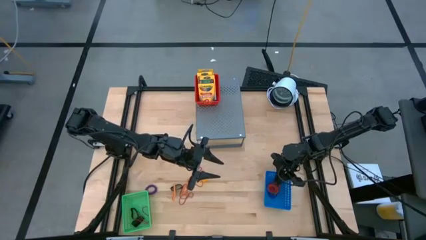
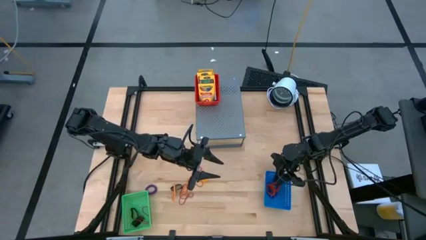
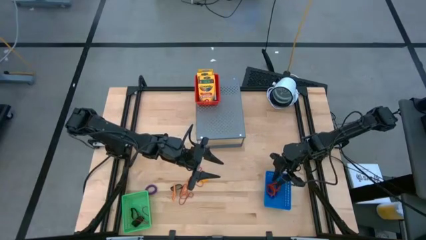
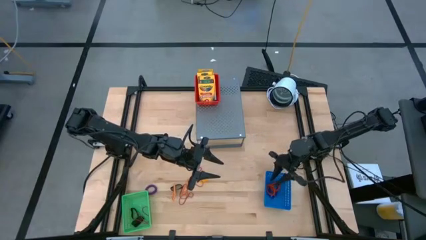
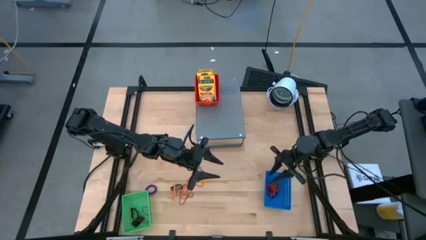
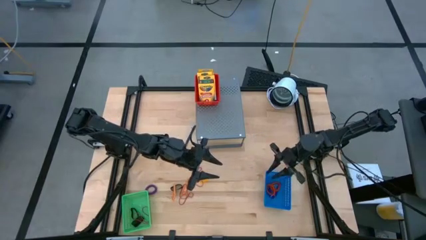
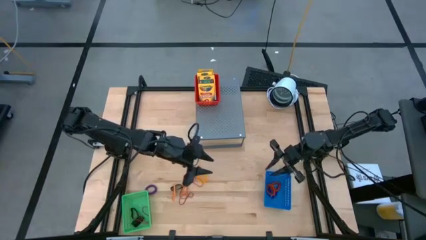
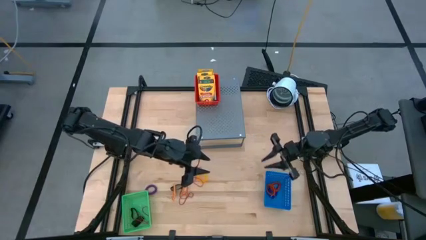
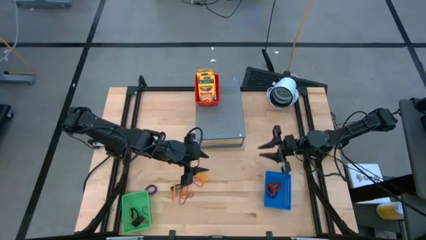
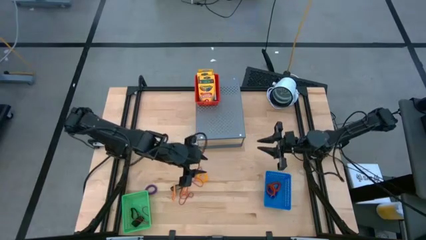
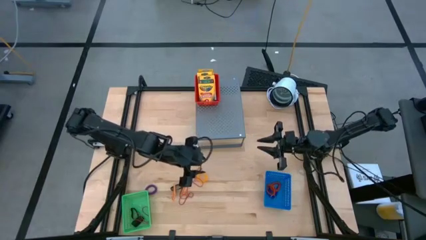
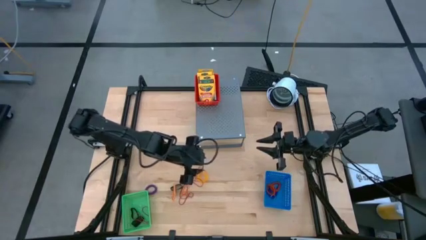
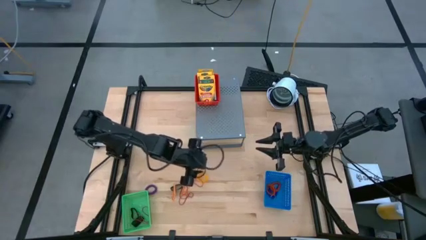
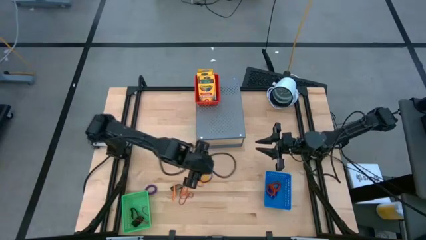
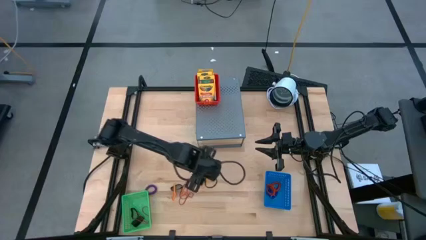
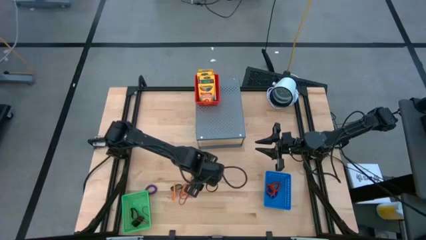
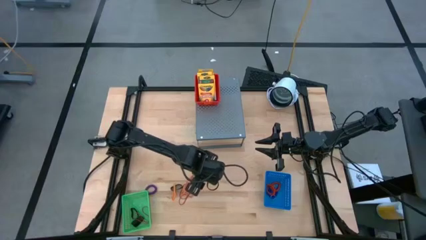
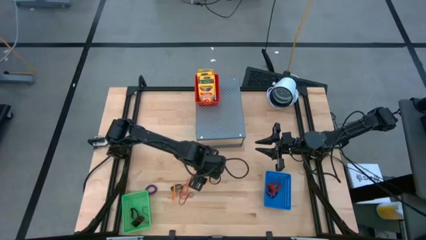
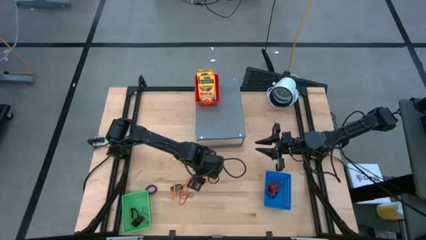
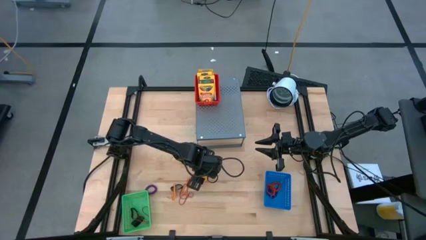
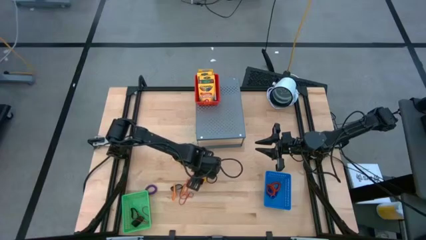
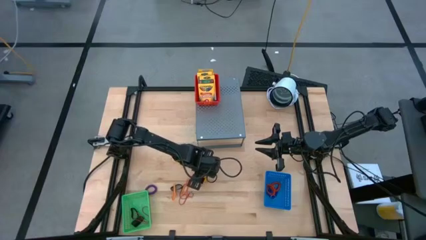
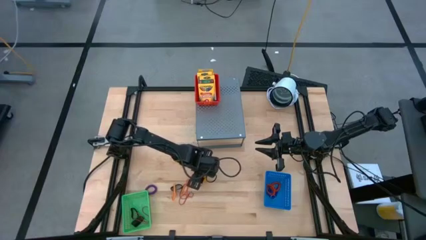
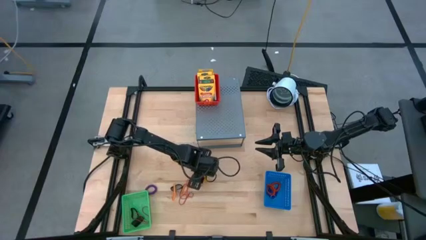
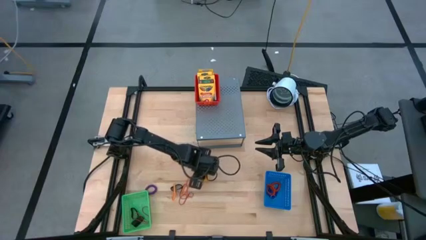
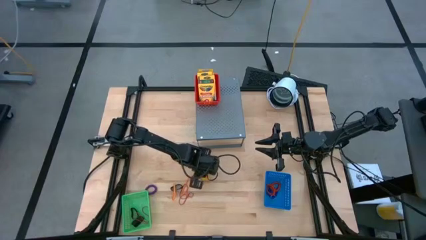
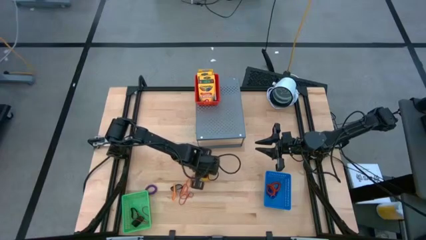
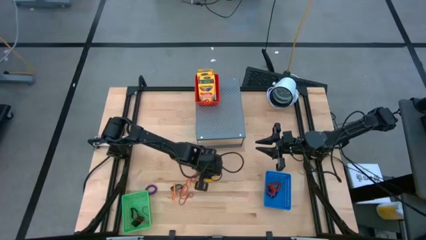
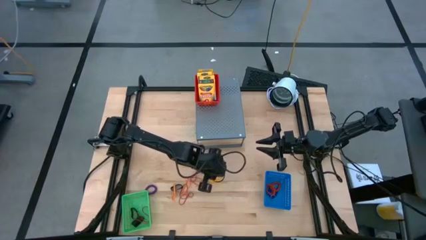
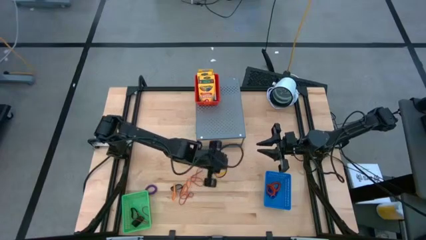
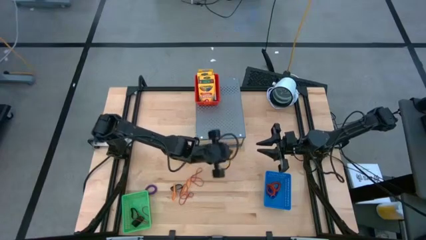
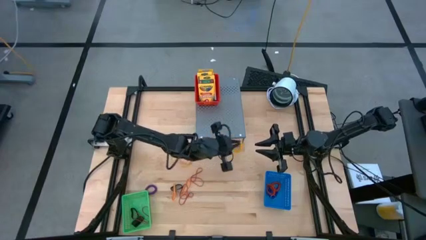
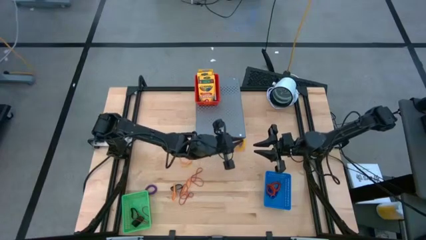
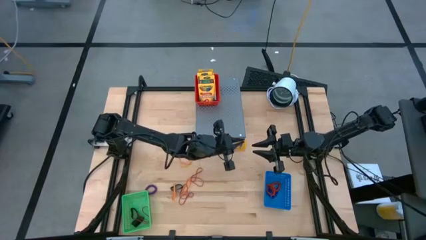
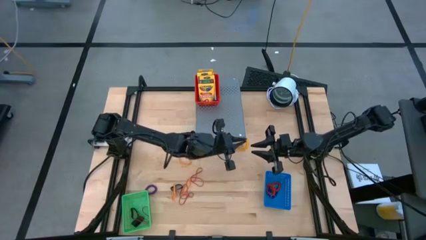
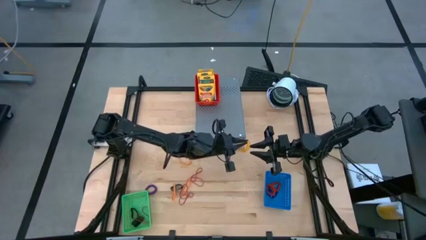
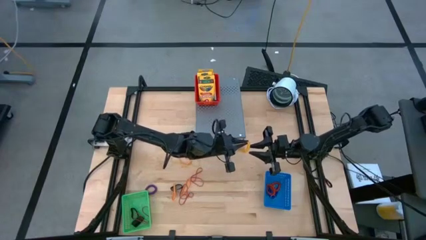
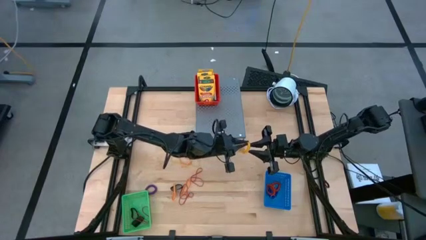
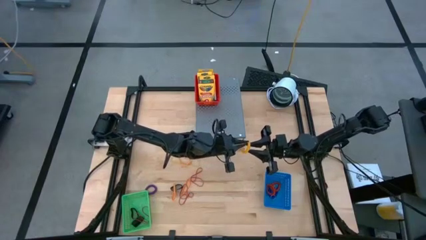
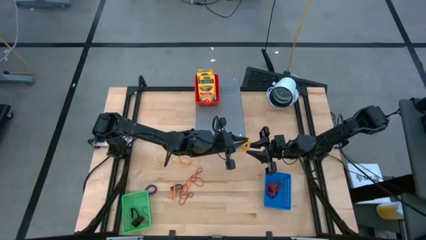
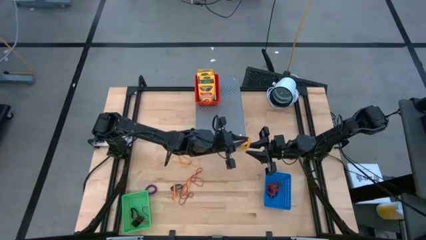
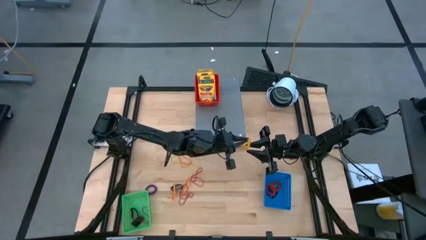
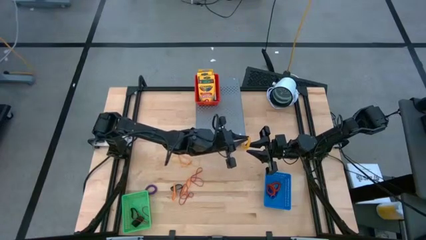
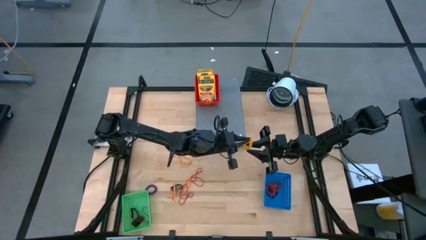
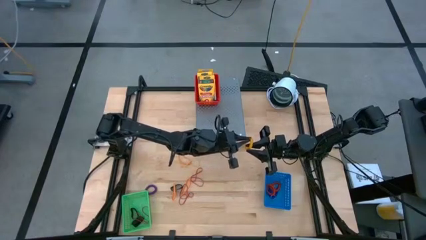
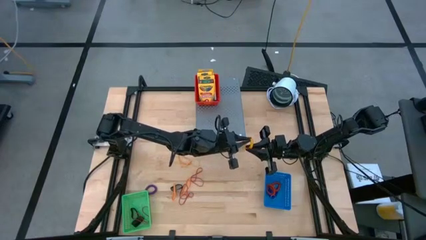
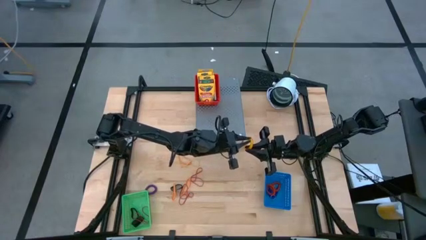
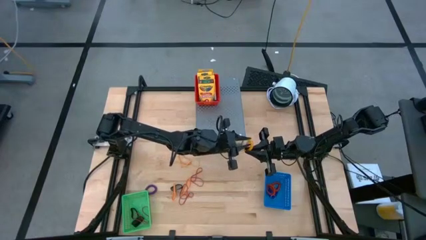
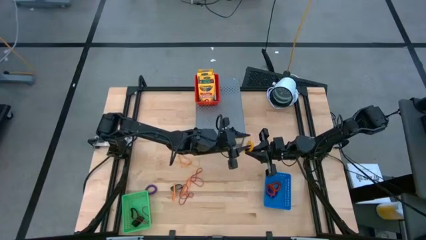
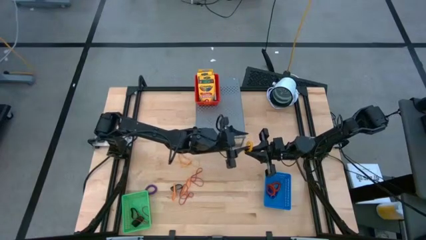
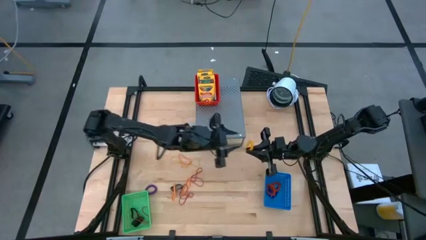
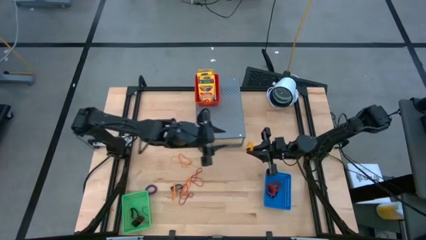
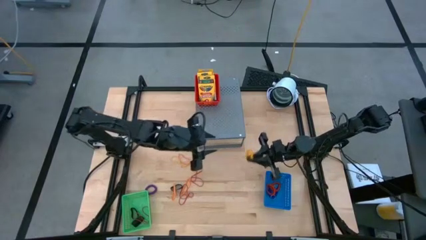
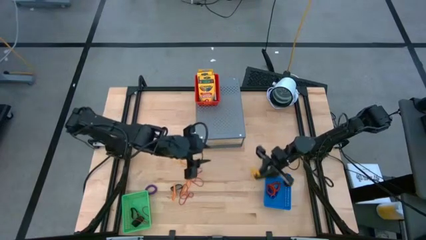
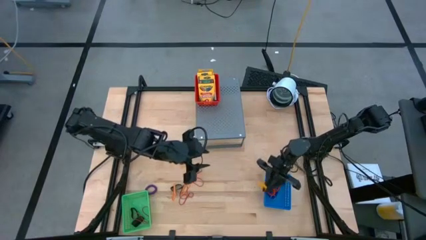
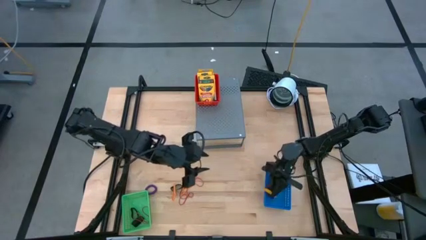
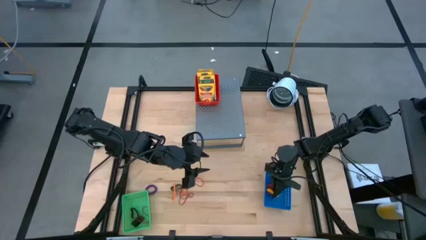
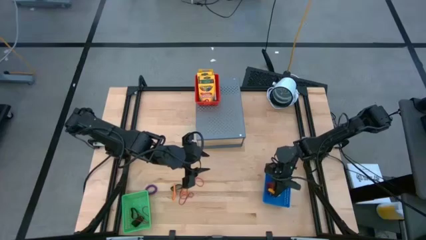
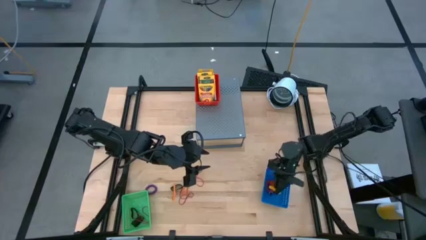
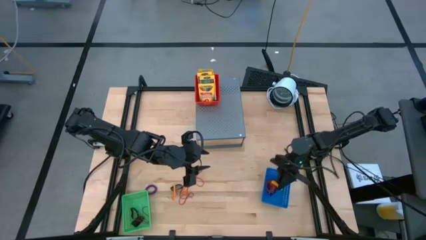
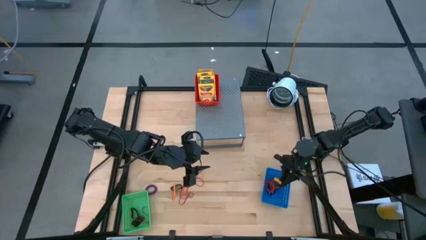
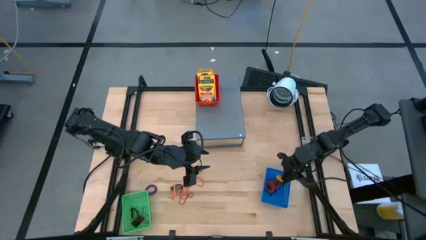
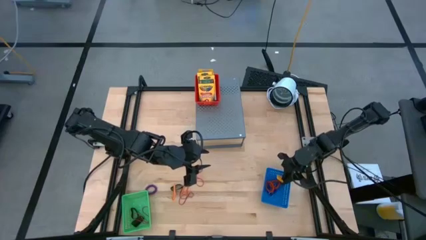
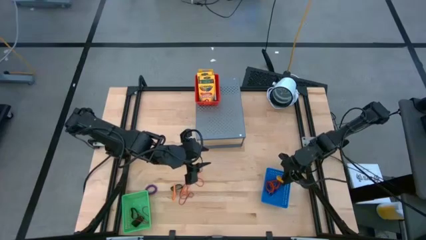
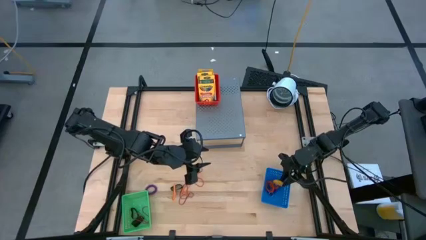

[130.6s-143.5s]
Task: Pick & Place Office Desk Supplies
Put the yellow spring keychain into the blue bin

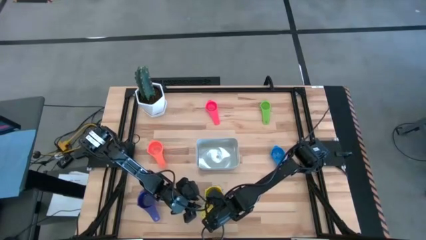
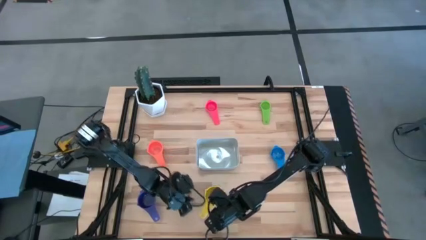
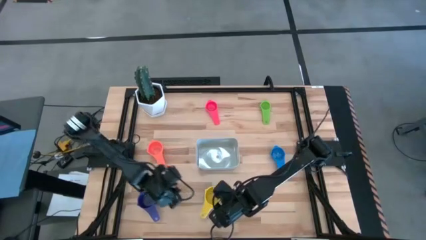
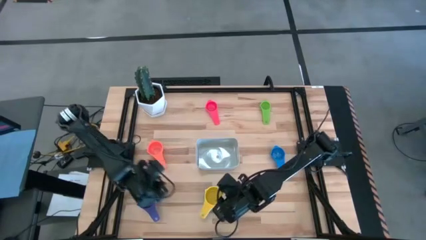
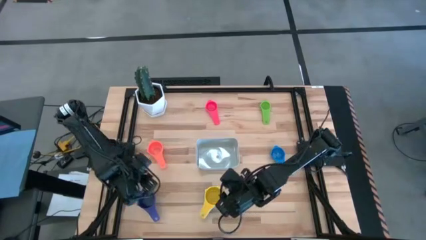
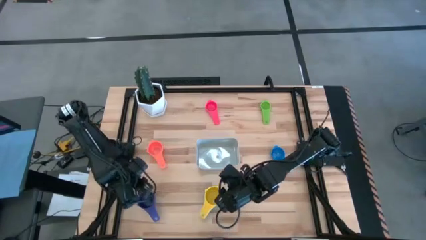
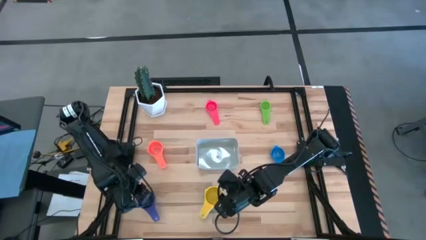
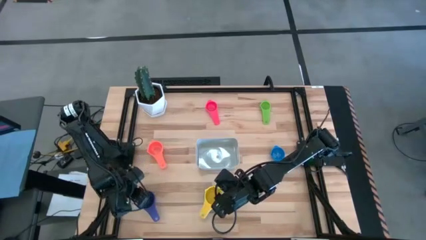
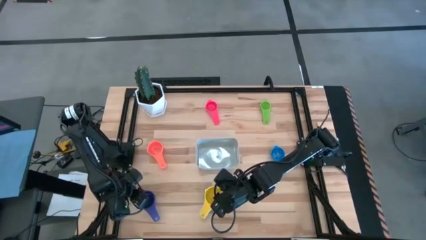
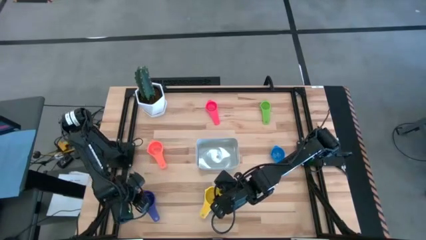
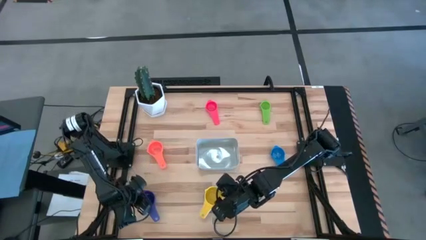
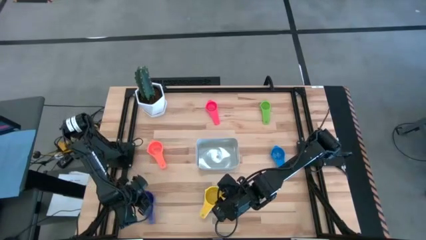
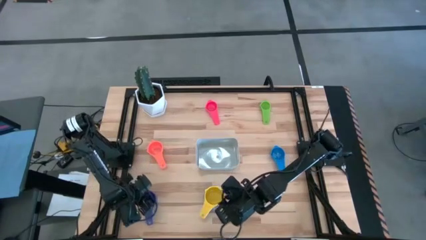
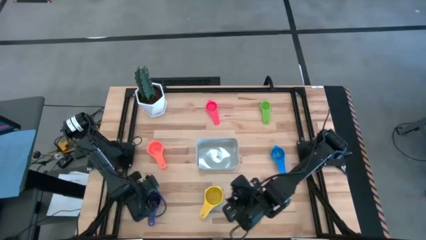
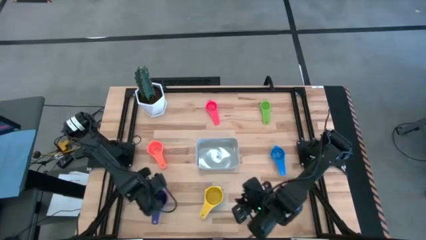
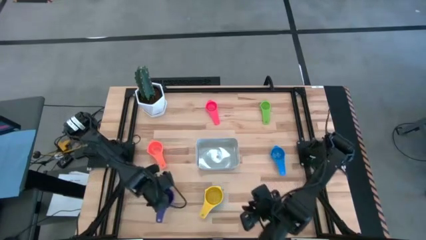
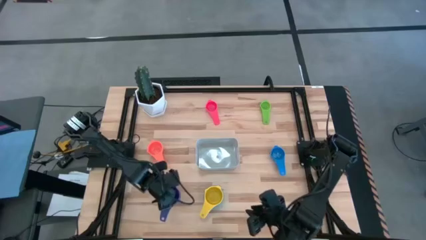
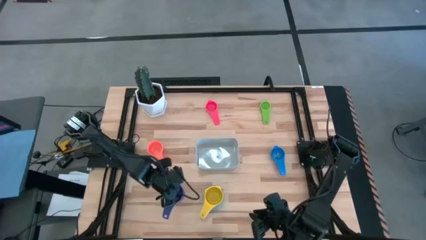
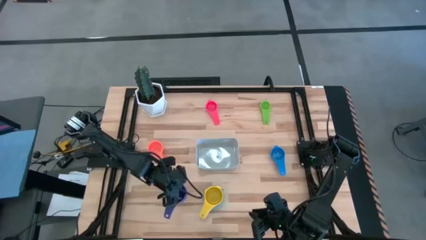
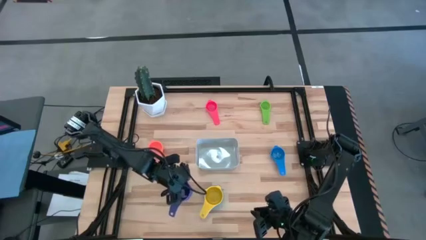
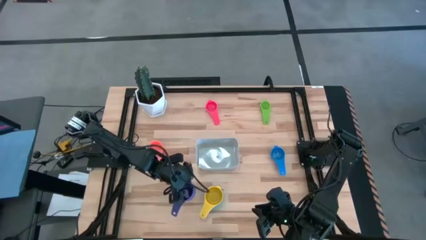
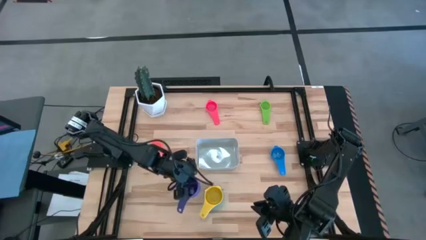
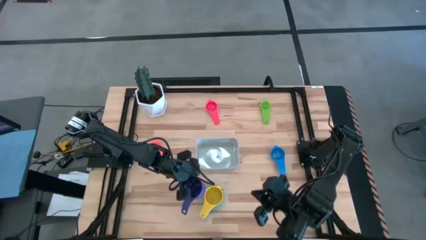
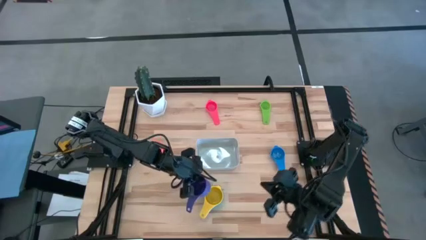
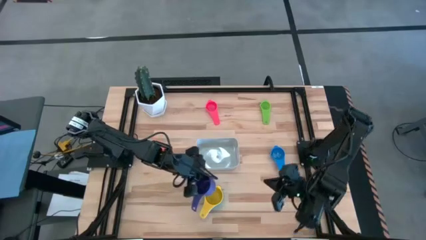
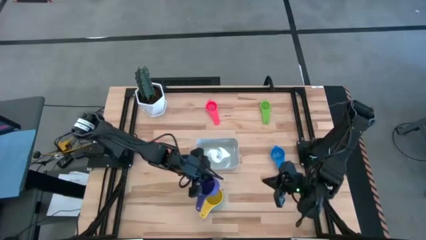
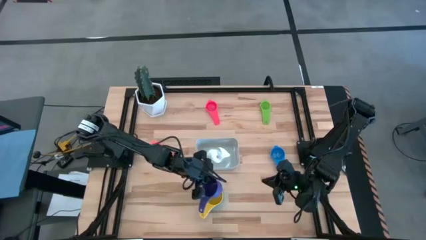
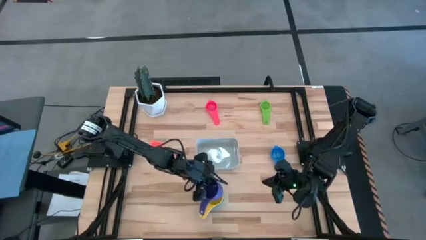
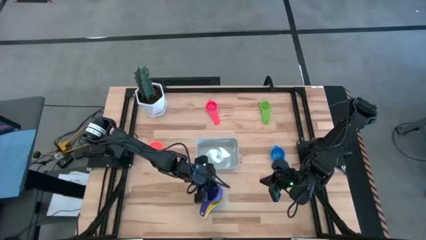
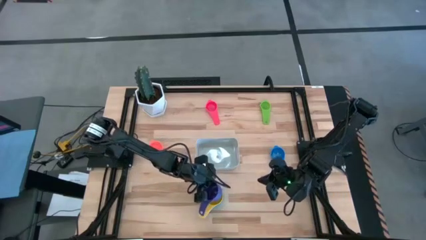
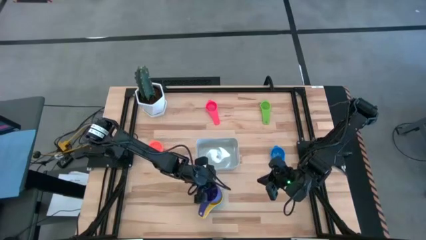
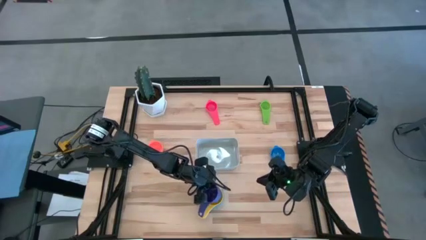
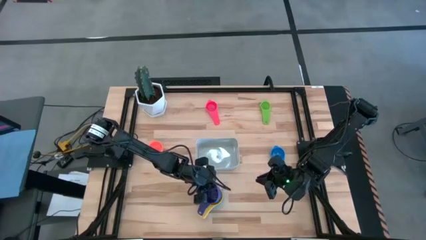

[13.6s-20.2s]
Task: Nest measuring cups in basket
Stack the the dark blue measuring cup on top of the yellow measuring cup
